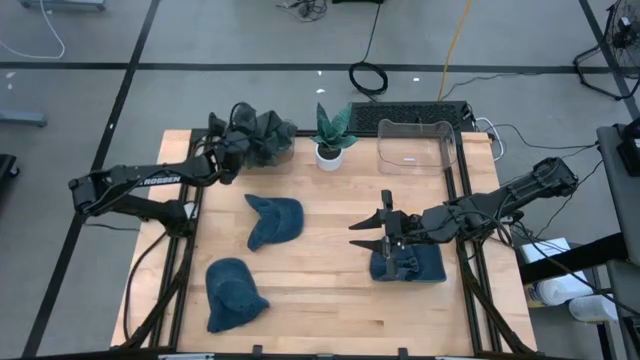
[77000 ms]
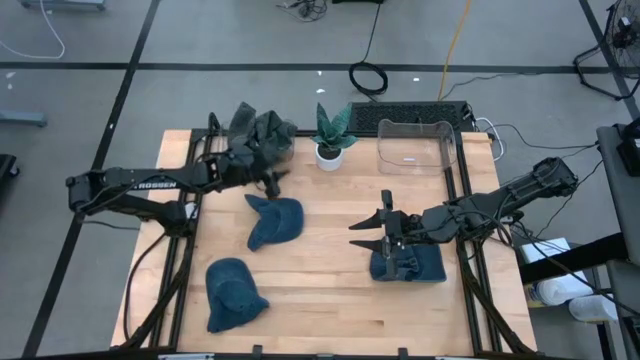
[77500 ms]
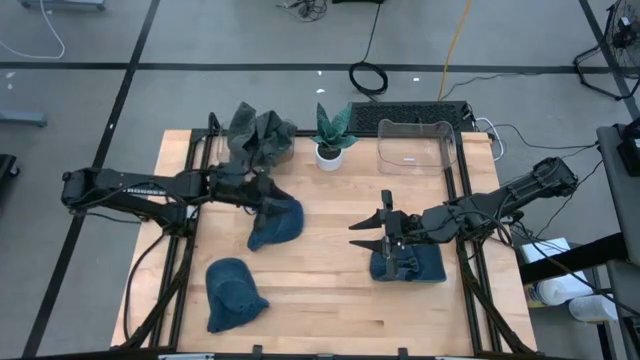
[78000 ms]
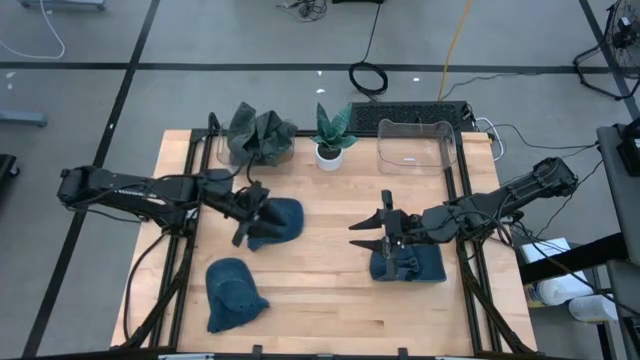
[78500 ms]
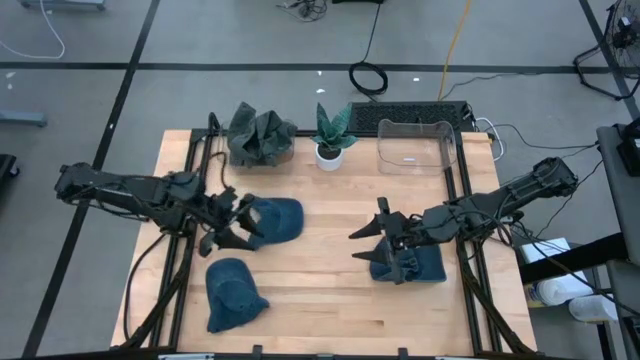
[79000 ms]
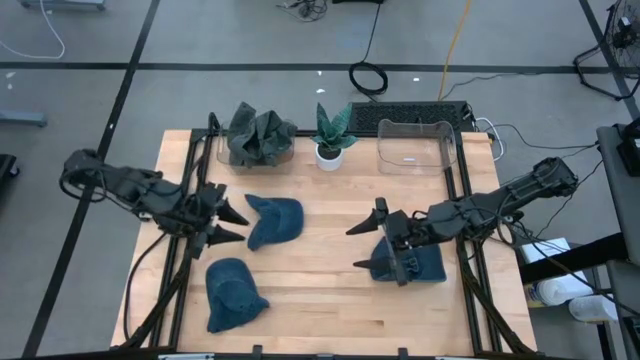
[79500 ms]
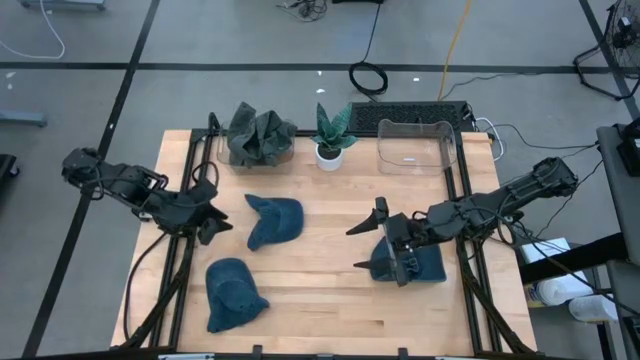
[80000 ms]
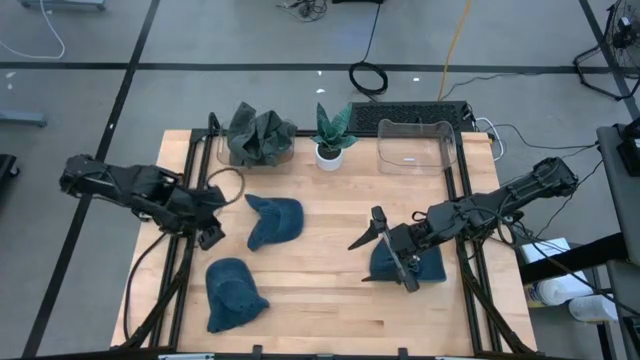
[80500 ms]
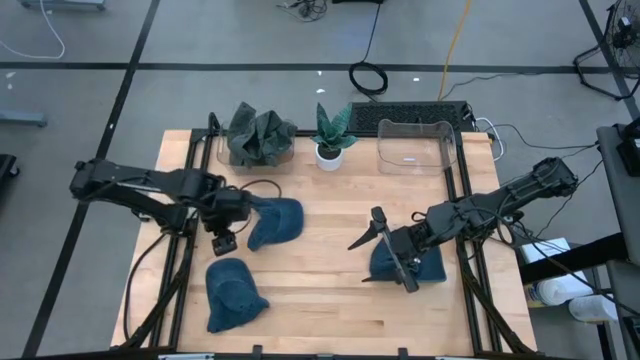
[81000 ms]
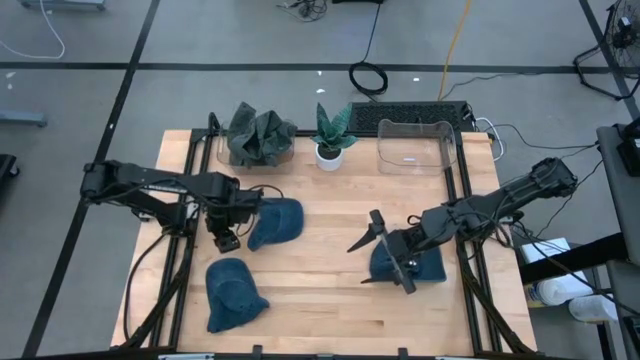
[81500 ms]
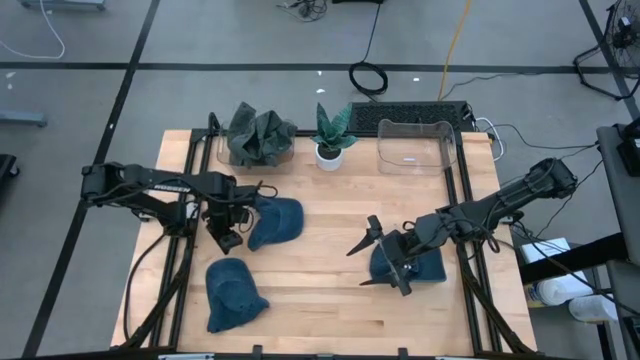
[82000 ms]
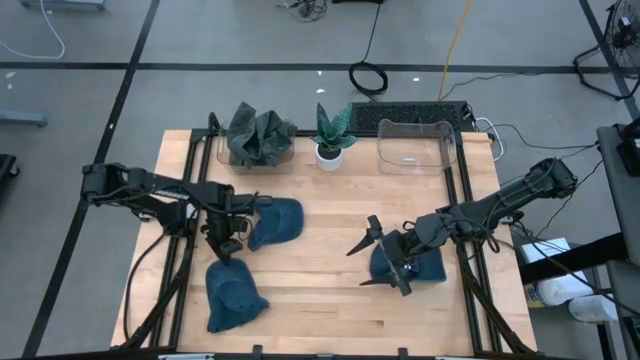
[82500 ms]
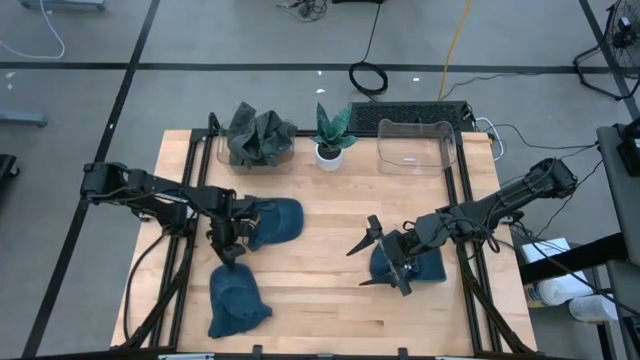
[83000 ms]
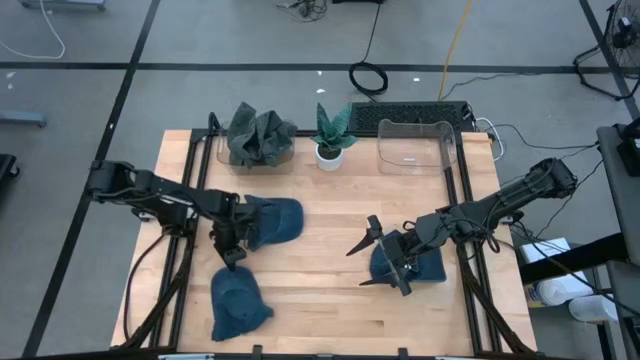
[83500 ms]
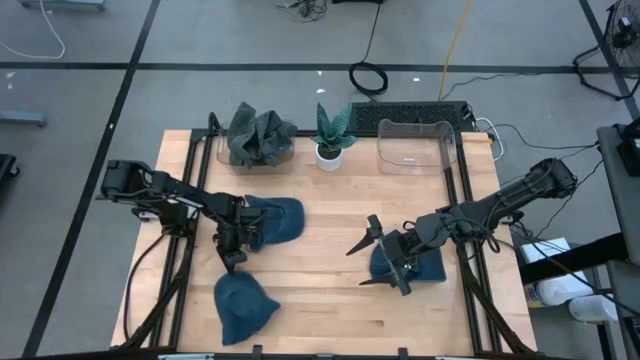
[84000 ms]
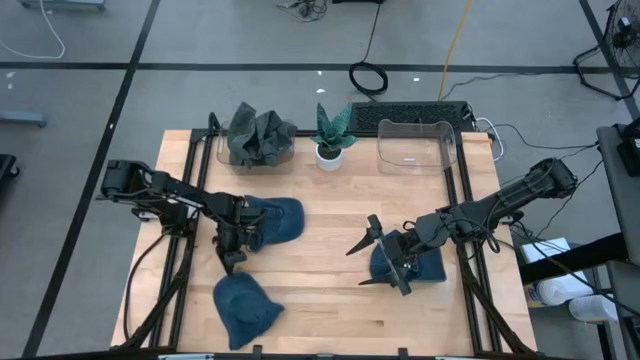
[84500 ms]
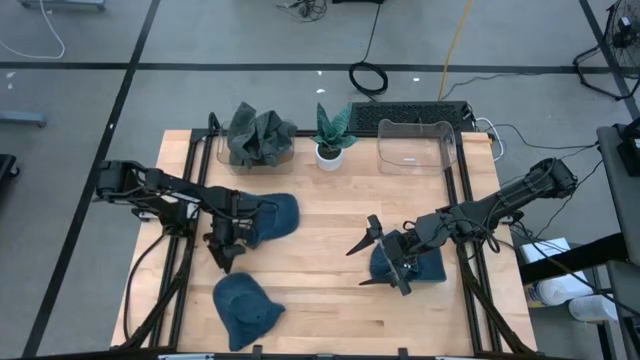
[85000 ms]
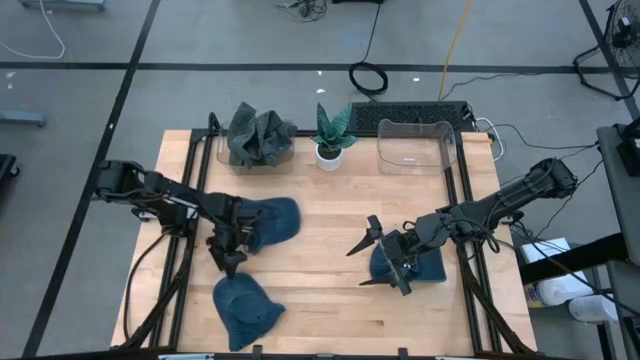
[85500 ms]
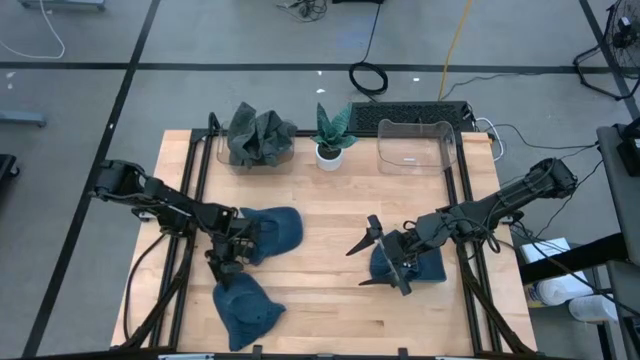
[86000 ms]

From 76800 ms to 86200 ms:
Task: Pick & Place hat
Put the bottom left blue cap into the right transparent bin

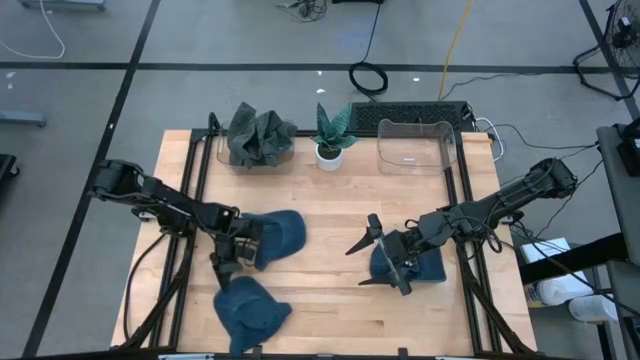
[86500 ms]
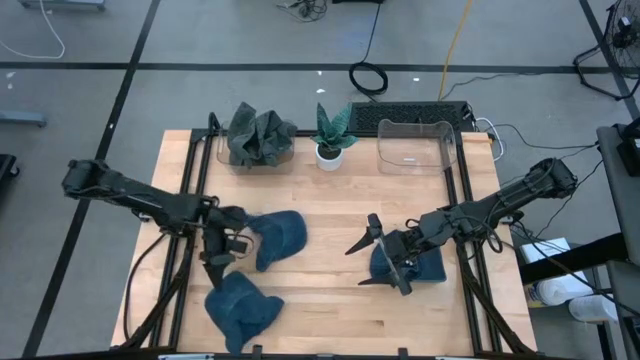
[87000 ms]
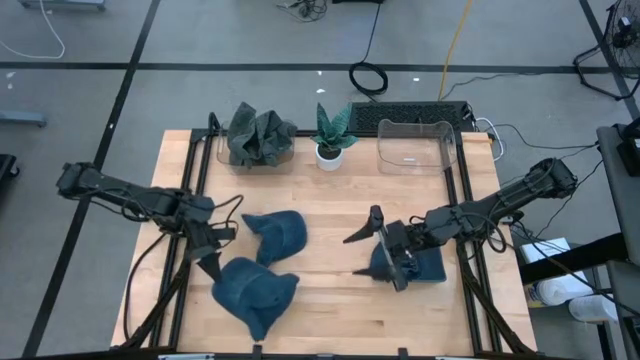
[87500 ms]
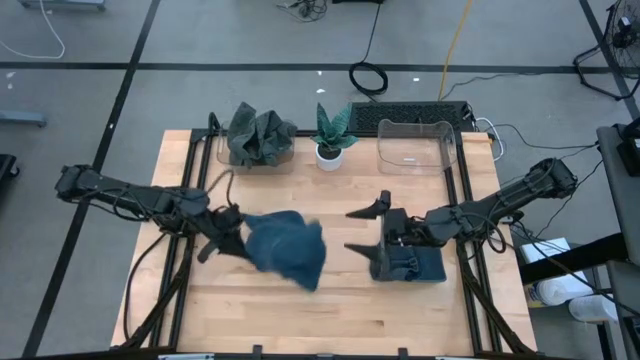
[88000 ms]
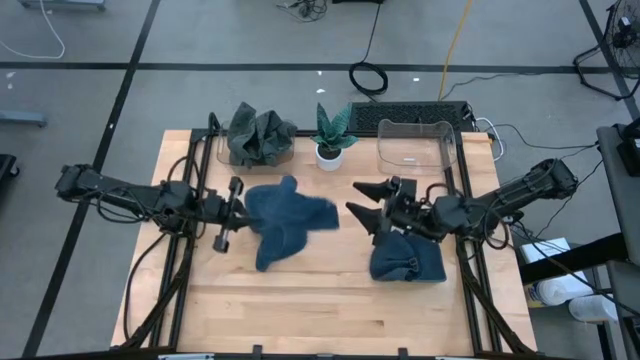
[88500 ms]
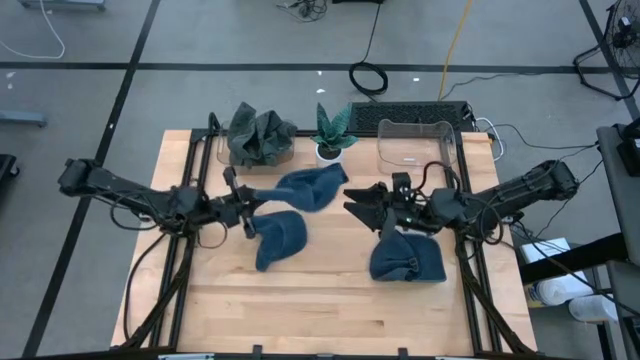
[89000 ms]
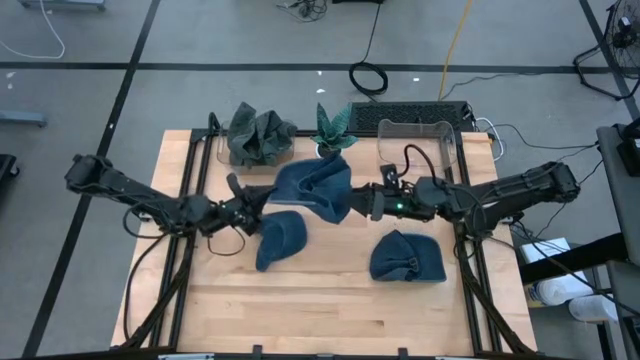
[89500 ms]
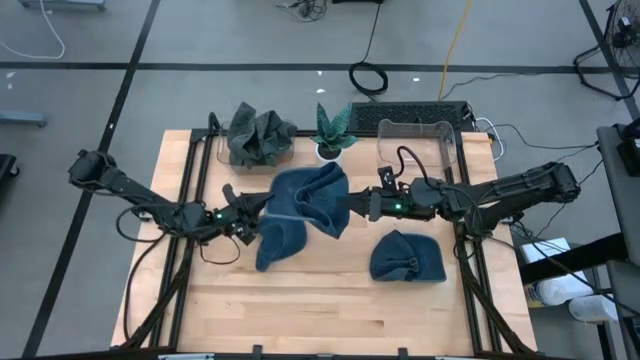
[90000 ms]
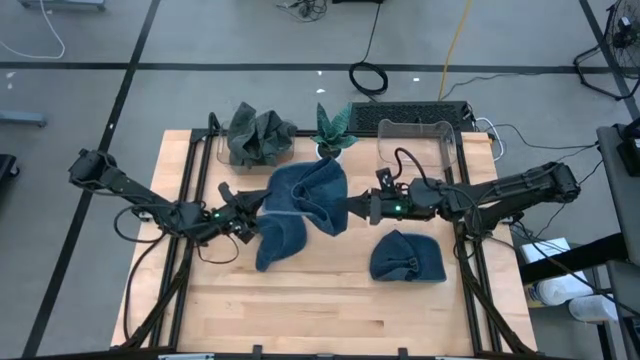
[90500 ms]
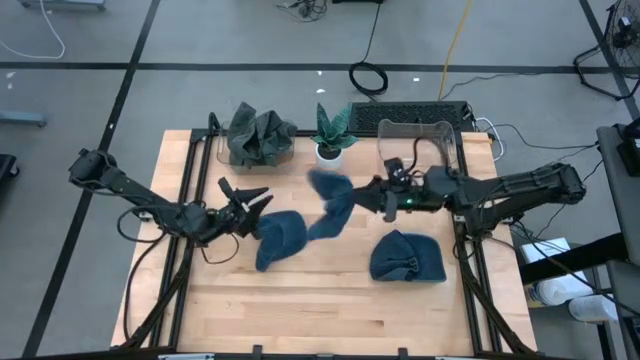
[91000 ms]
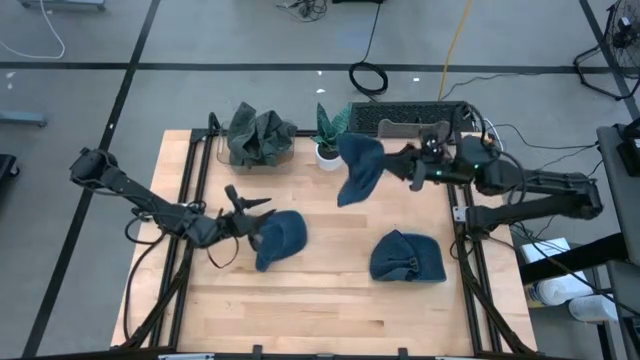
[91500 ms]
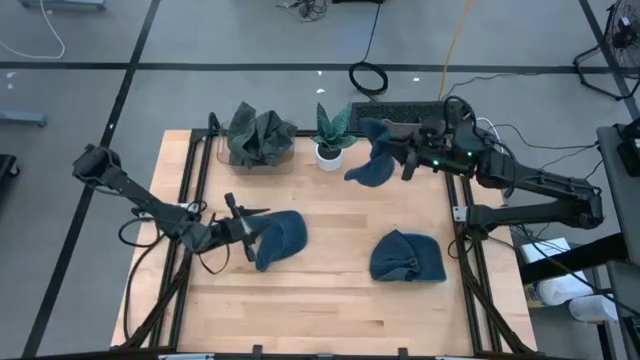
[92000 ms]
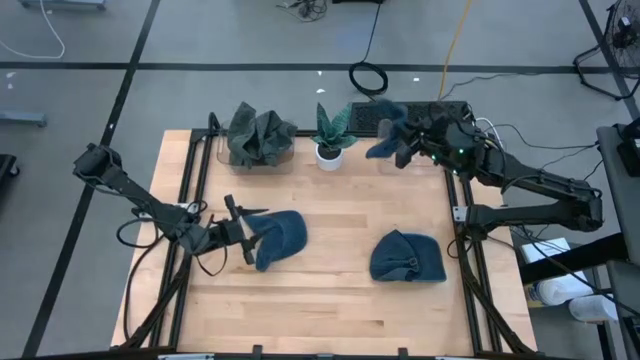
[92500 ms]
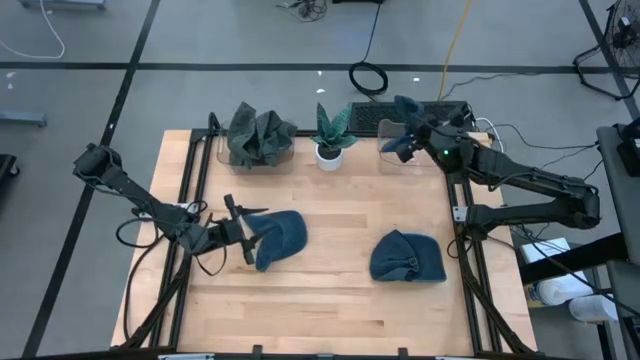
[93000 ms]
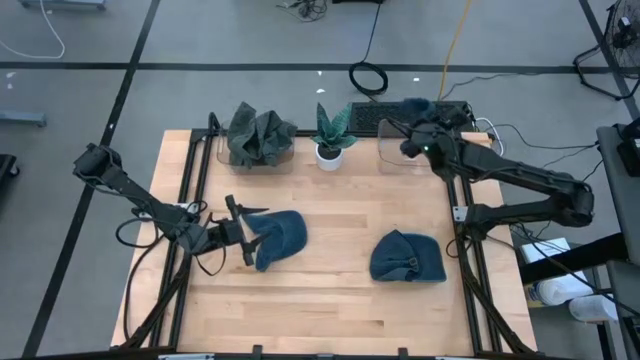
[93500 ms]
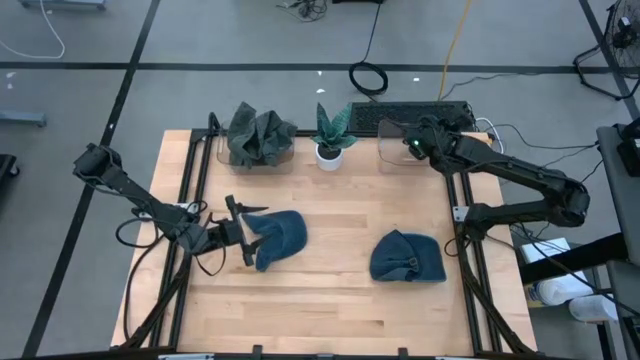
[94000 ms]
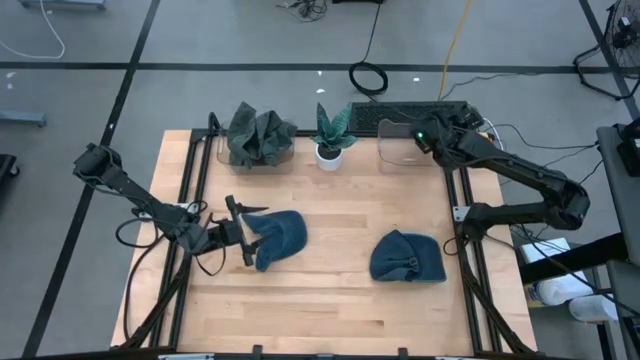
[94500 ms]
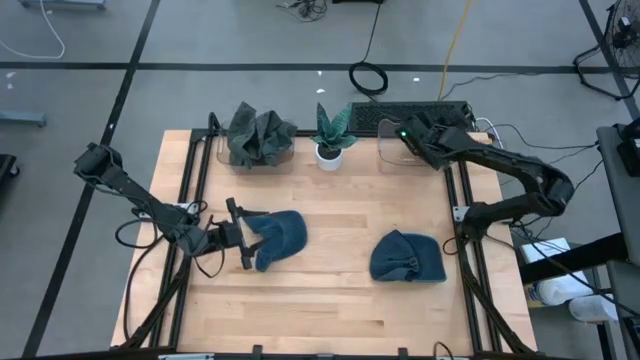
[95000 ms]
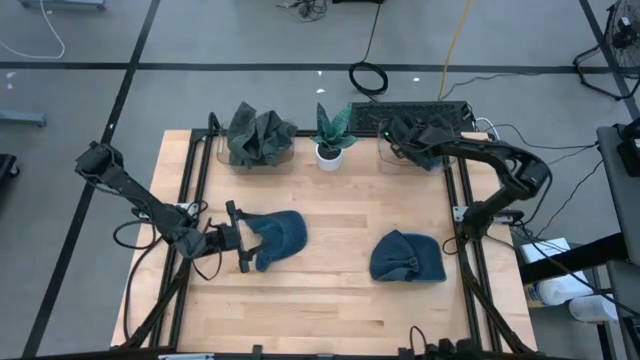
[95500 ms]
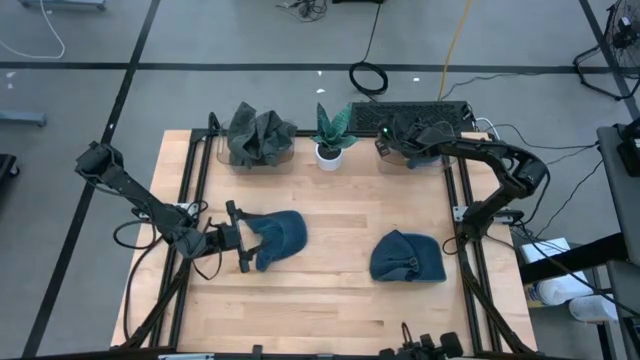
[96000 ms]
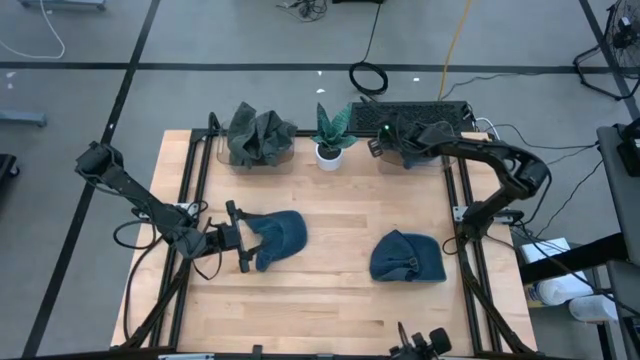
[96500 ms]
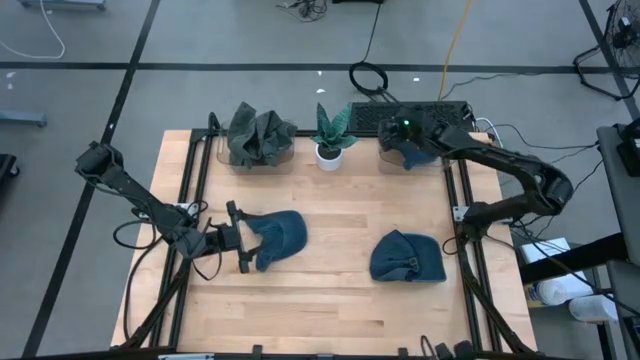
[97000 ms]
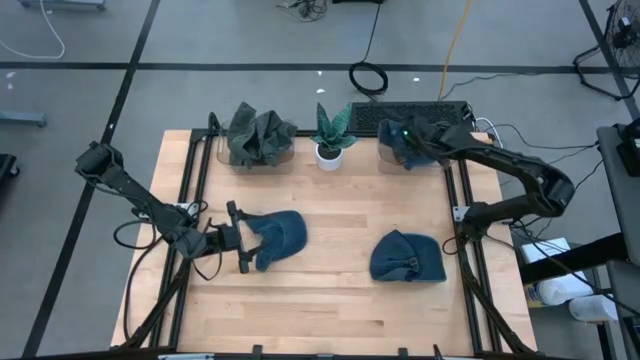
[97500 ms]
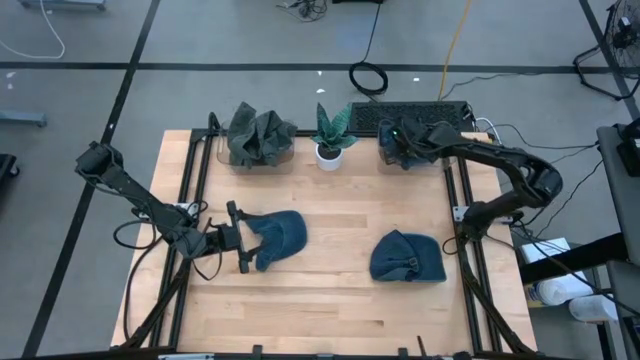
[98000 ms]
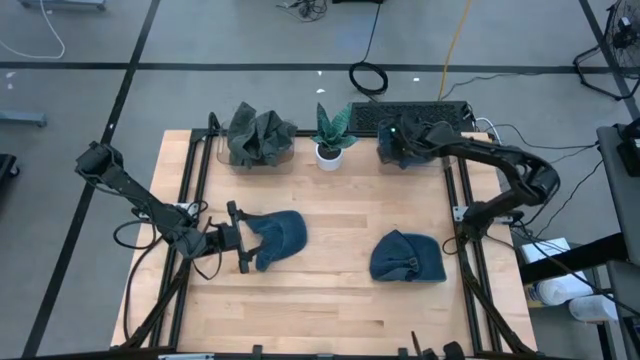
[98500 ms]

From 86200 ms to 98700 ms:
Put the bottom left blue cap into the right transparent bin
